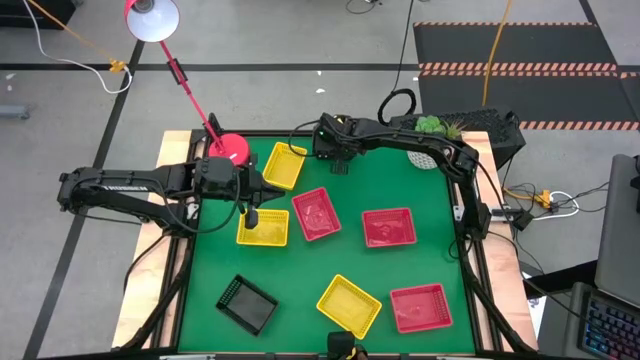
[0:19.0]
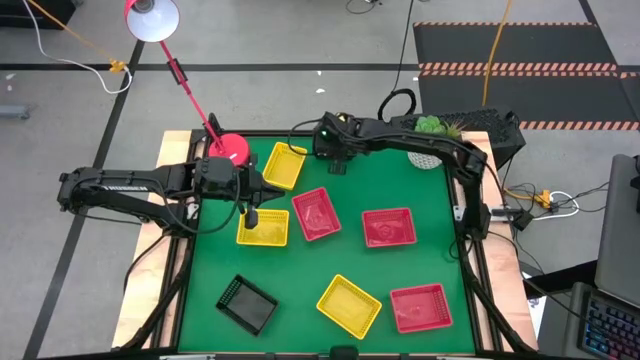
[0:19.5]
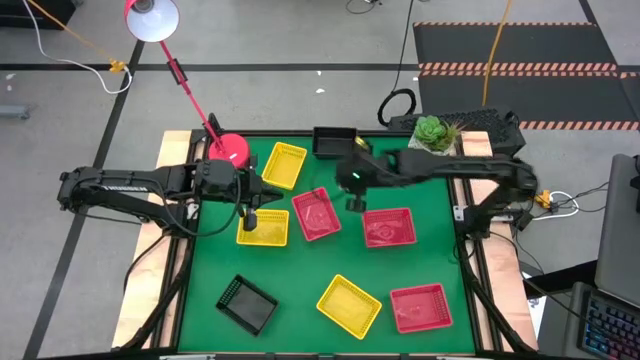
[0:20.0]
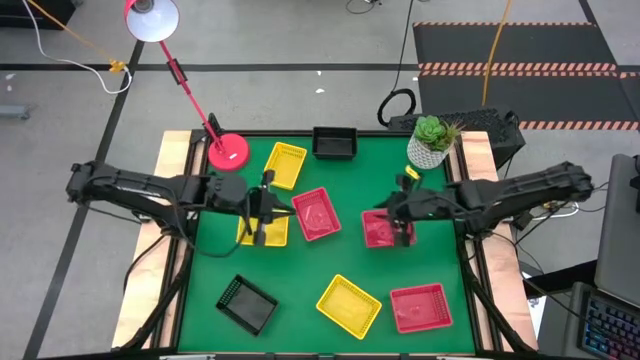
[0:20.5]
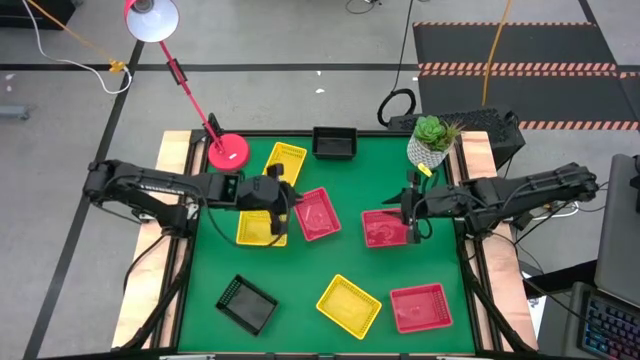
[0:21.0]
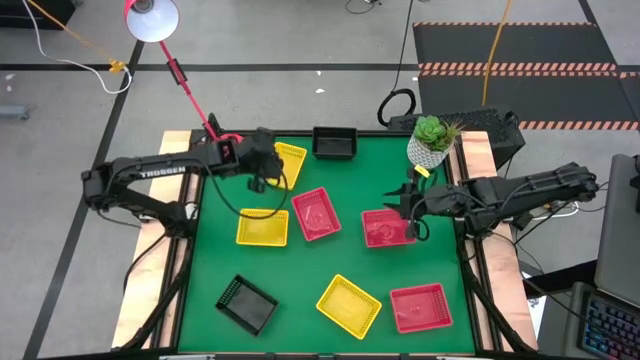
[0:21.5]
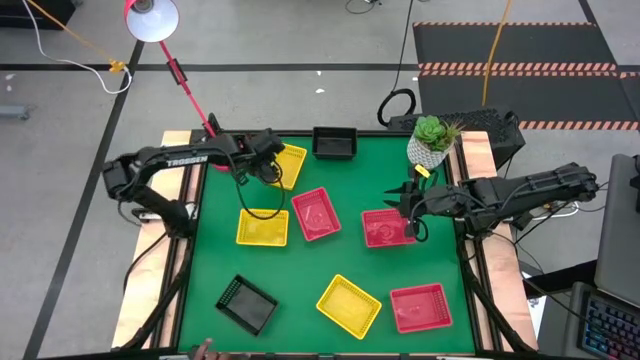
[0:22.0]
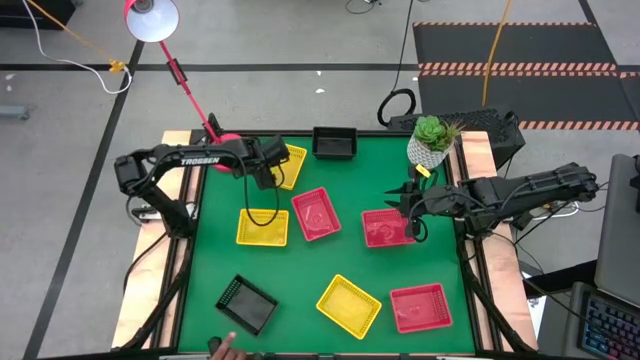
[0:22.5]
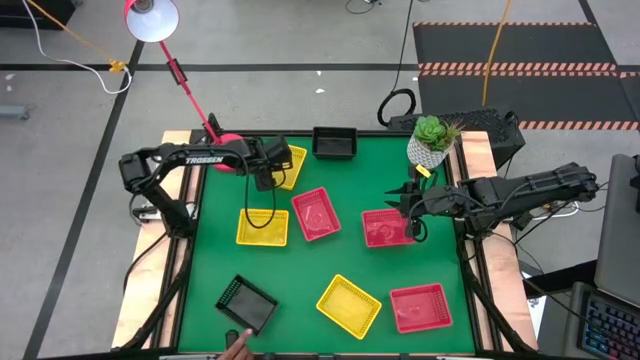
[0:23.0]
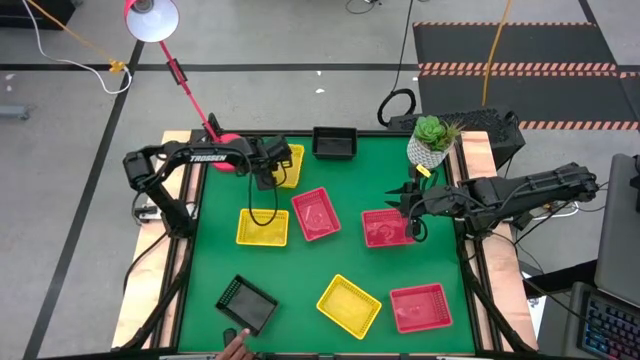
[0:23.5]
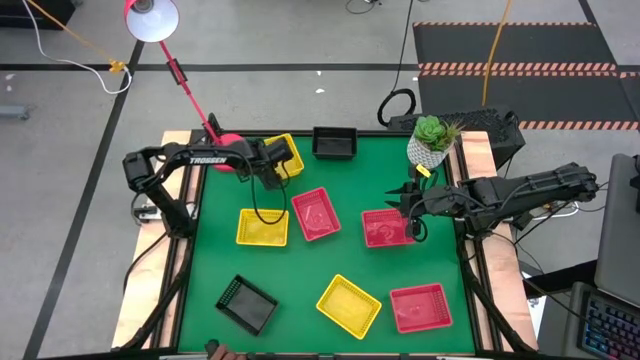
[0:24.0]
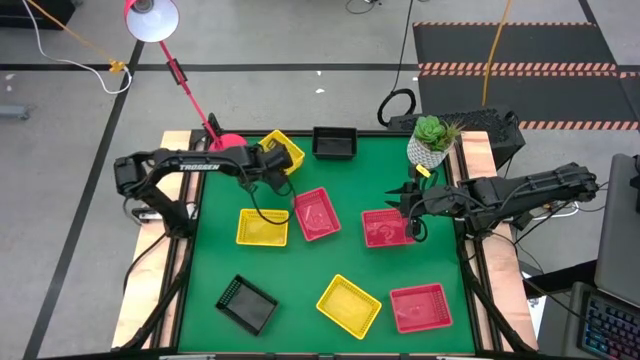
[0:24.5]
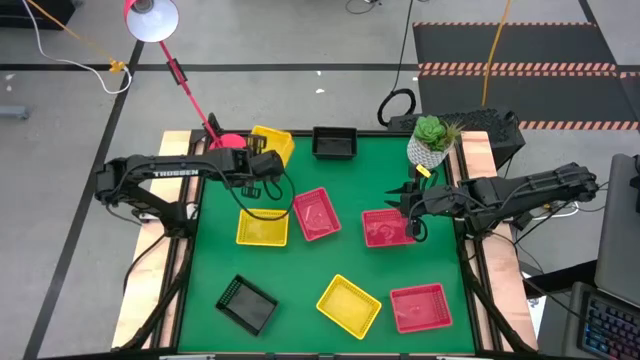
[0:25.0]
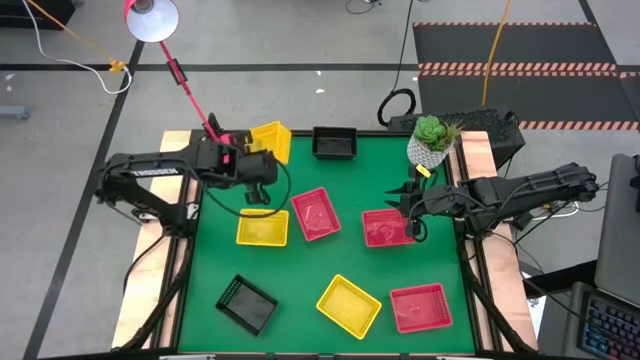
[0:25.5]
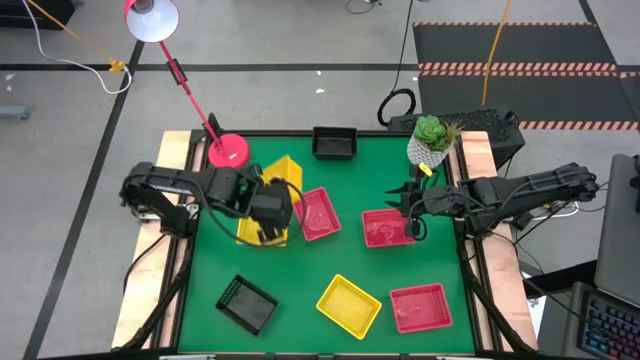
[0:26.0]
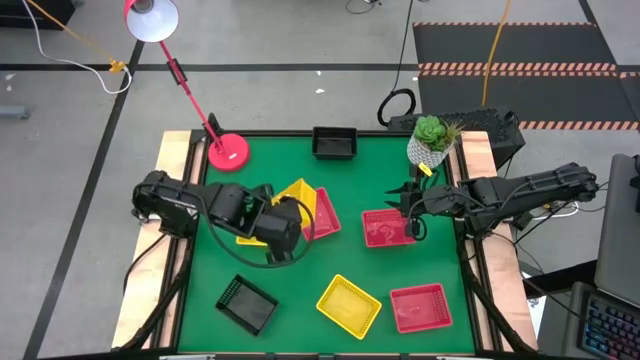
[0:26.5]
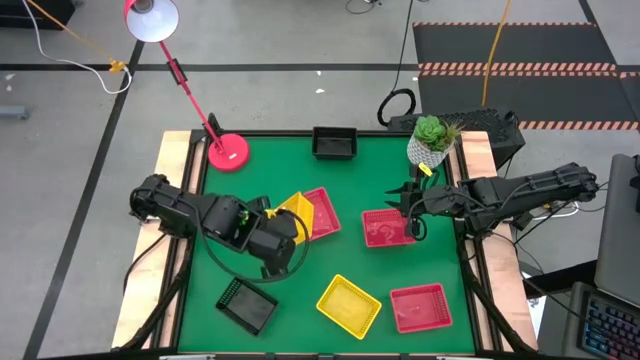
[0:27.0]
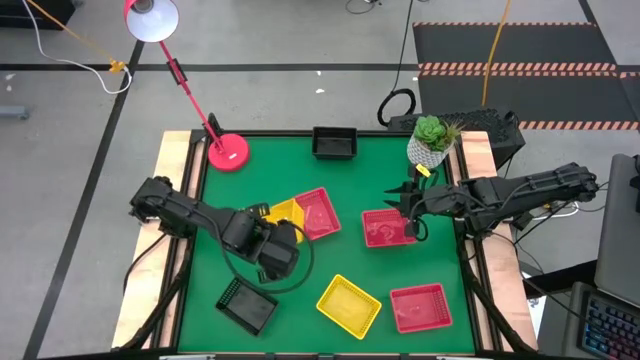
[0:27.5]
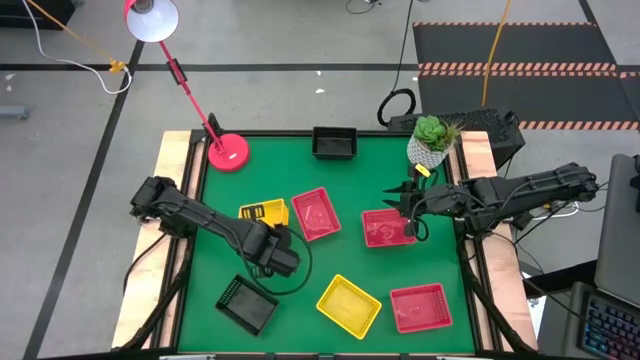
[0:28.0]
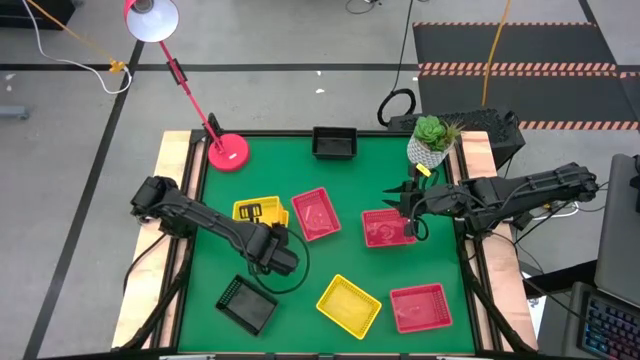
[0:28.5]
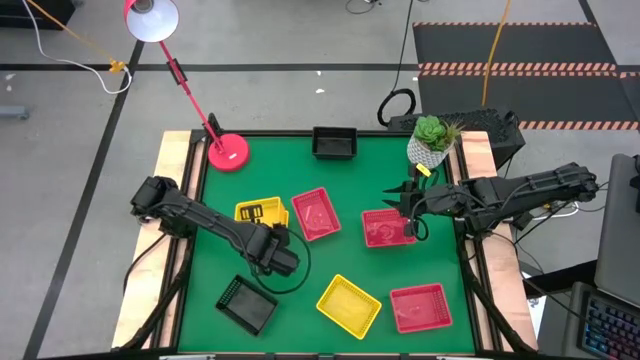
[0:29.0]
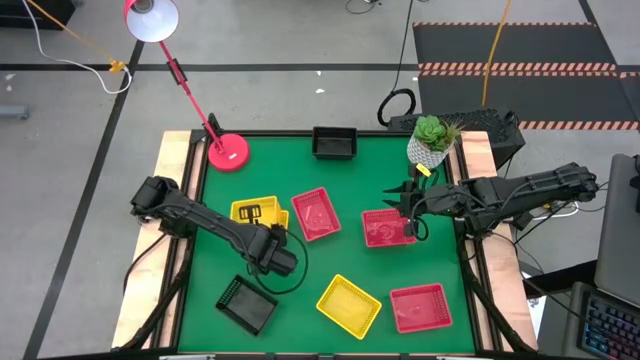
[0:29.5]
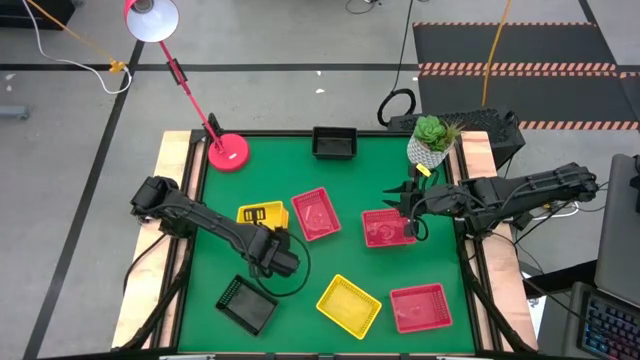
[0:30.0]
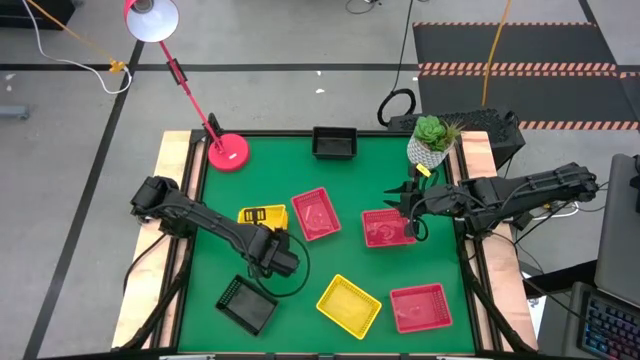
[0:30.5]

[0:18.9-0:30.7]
Stack the top yellow bin on the middle yellow bin

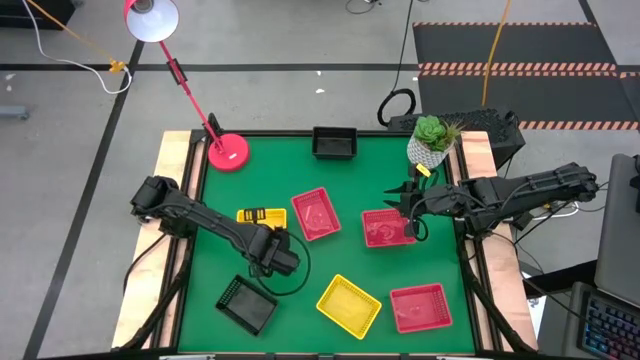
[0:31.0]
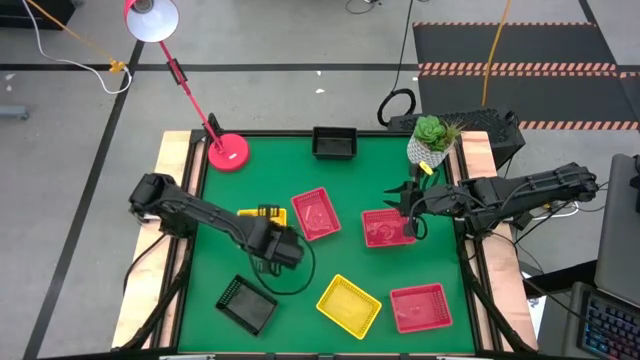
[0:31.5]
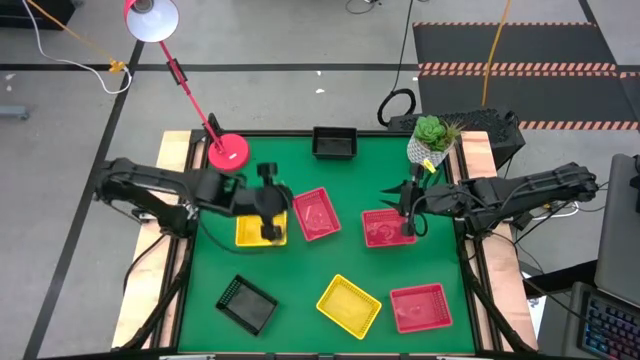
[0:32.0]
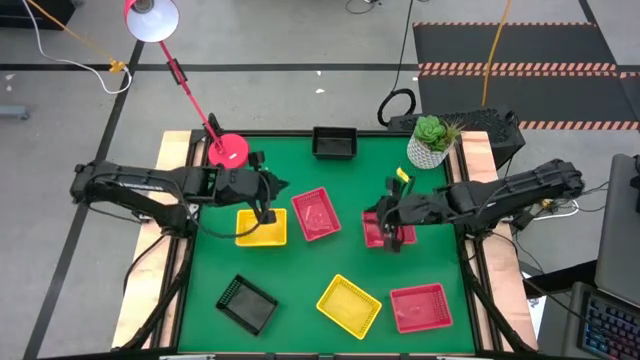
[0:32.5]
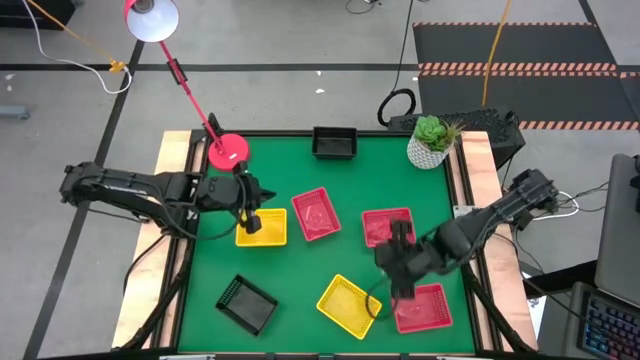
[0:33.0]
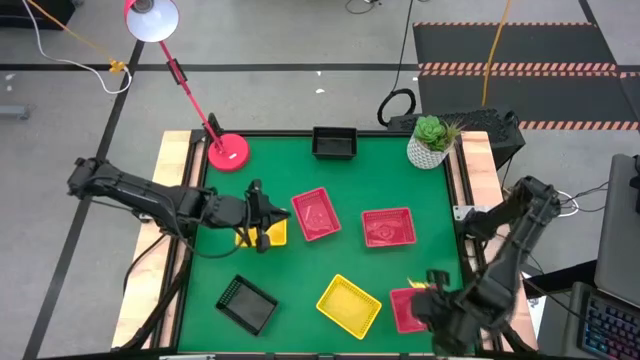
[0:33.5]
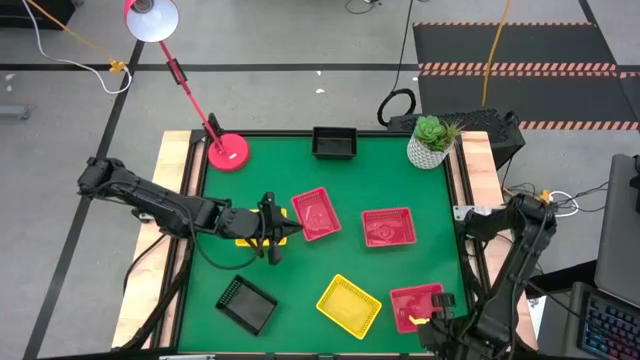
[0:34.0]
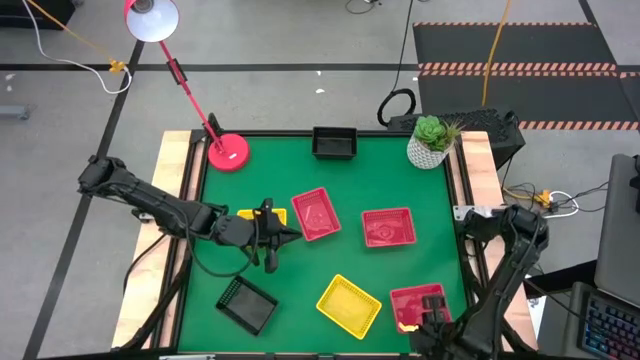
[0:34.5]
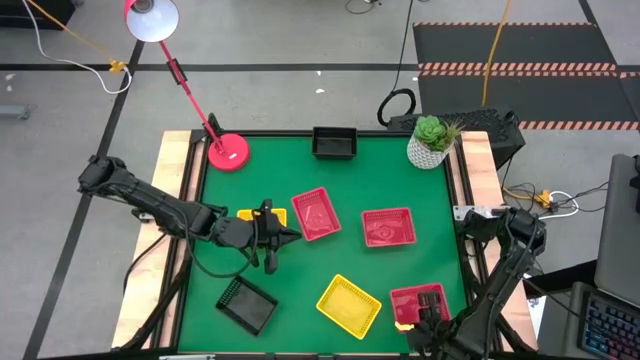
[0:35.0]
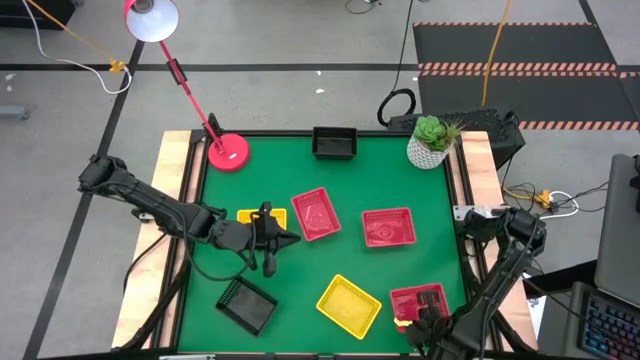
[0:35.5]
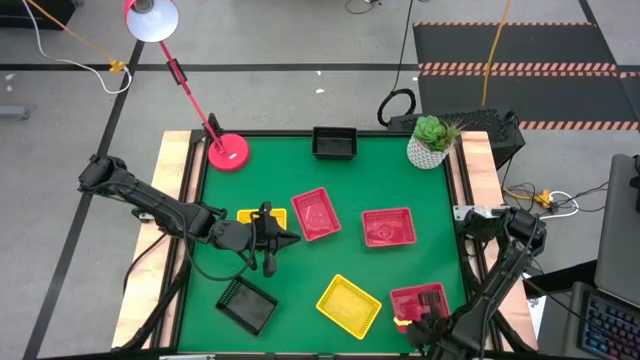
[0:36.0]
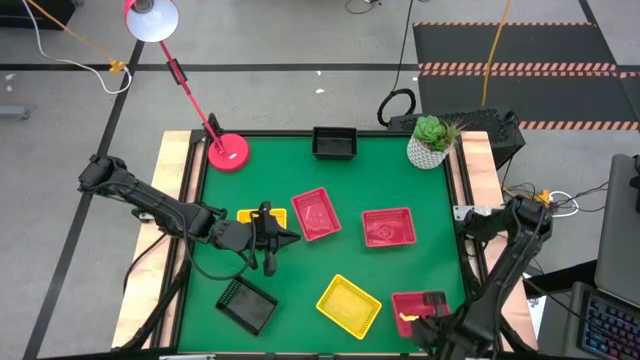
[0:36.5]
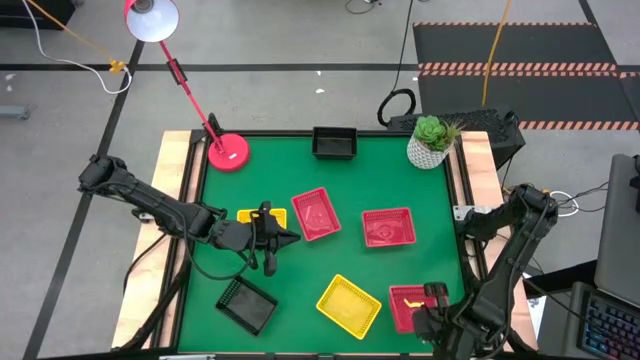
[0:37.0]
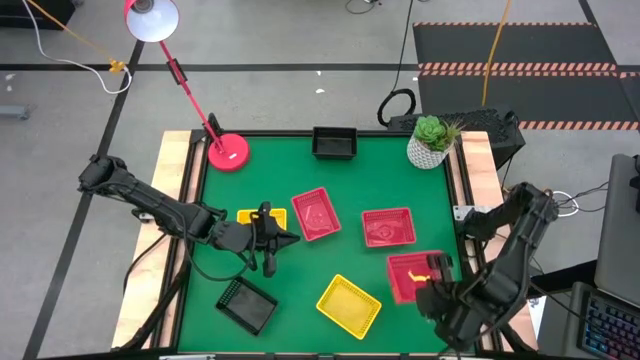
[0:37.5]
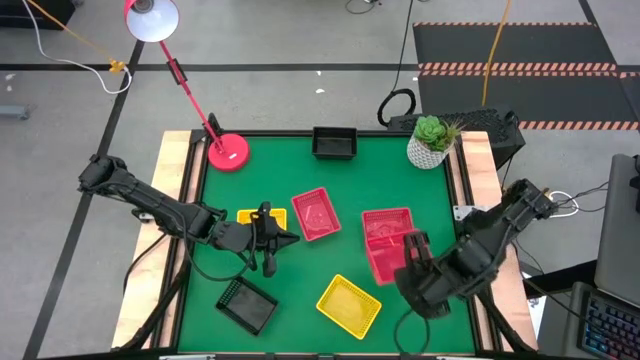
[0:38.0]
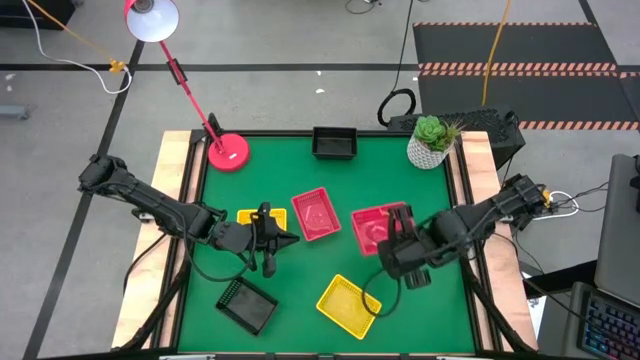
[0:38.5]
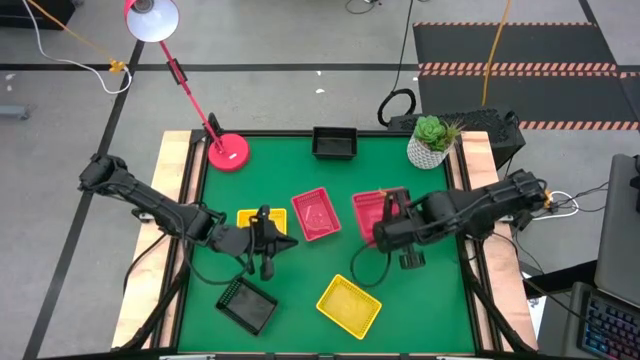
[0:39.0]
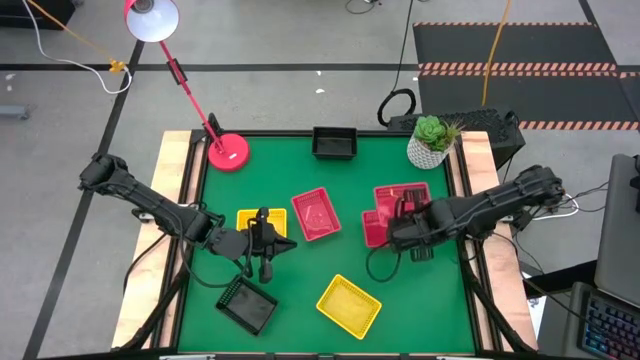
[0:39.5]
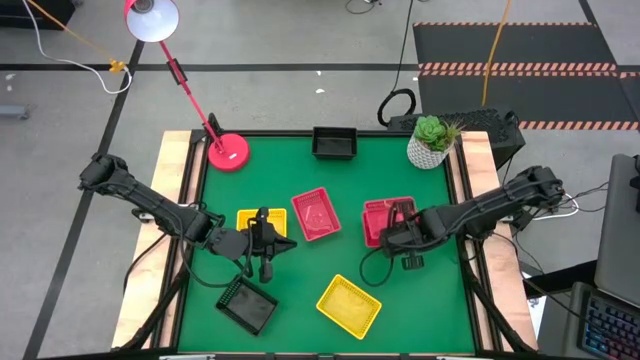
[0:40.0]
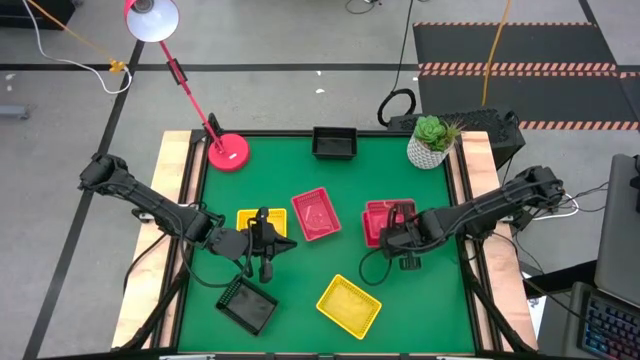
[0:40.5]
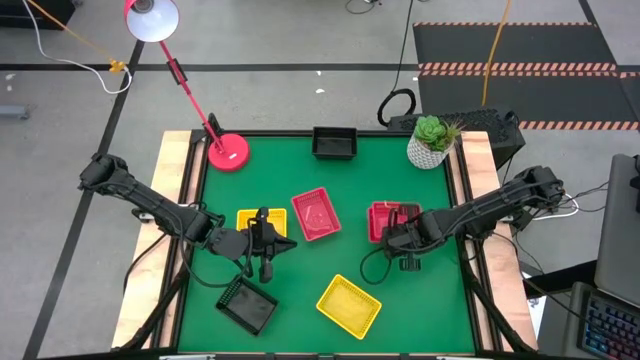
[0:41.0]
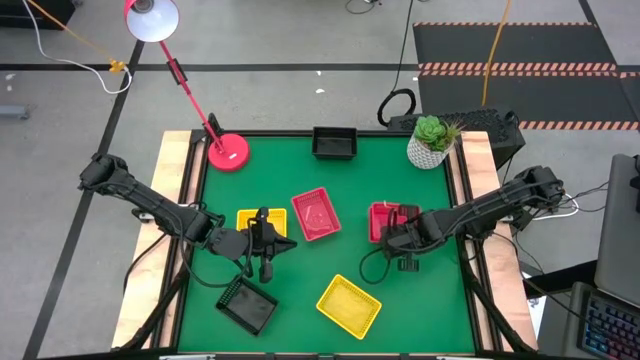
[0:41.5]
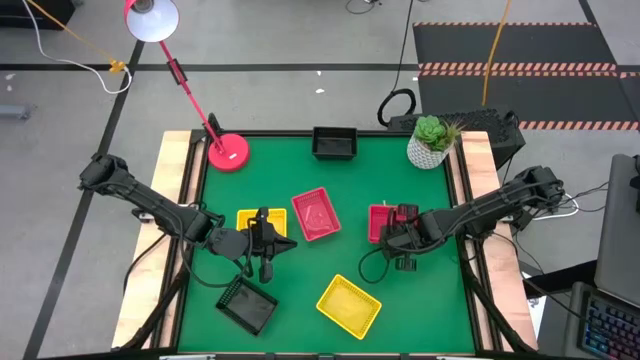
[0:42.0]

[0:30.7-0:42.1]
Stack the bottom red bin on the middle red bin
